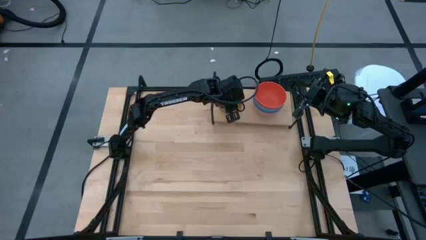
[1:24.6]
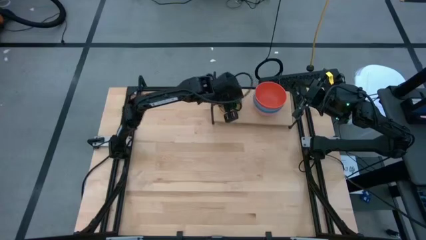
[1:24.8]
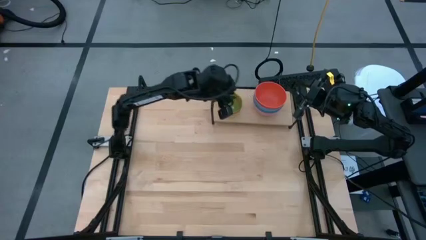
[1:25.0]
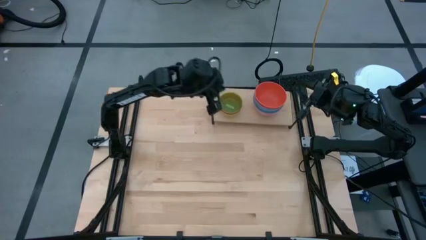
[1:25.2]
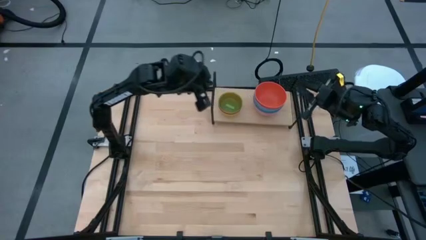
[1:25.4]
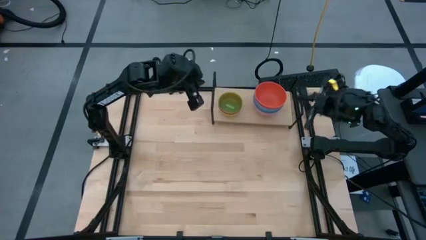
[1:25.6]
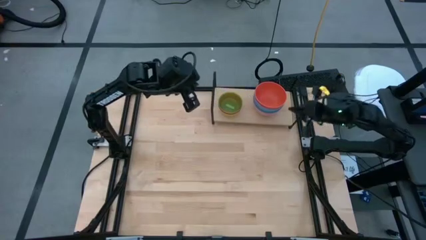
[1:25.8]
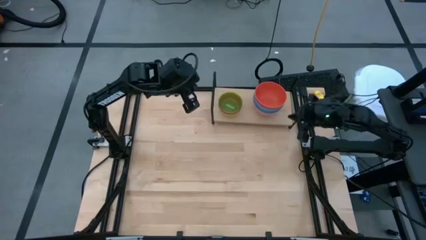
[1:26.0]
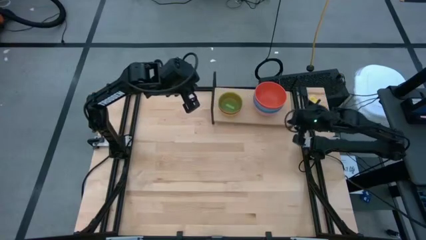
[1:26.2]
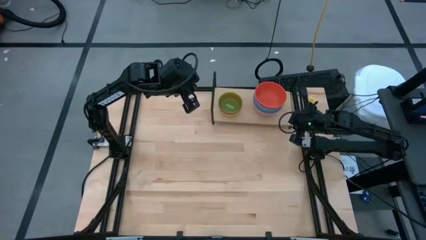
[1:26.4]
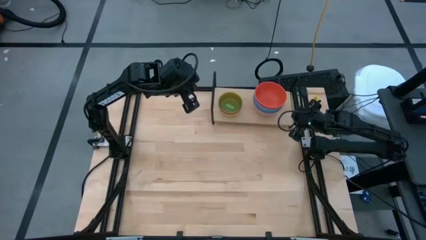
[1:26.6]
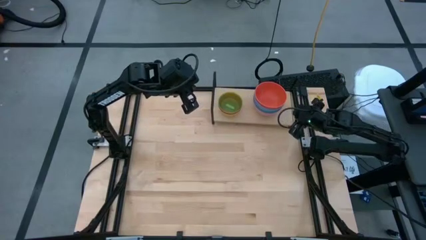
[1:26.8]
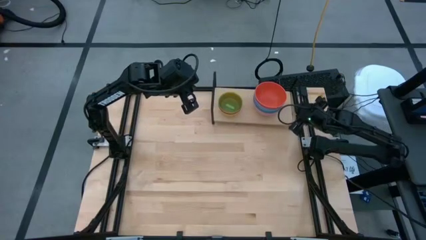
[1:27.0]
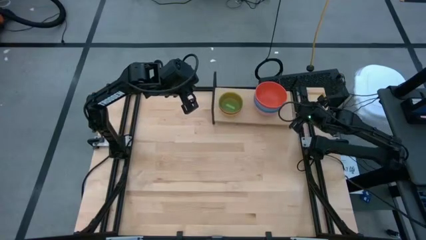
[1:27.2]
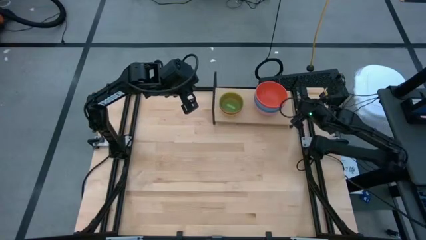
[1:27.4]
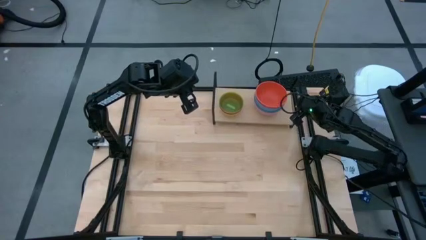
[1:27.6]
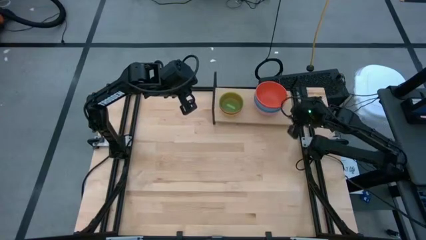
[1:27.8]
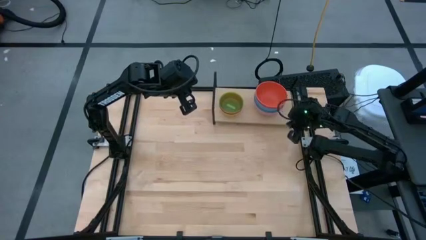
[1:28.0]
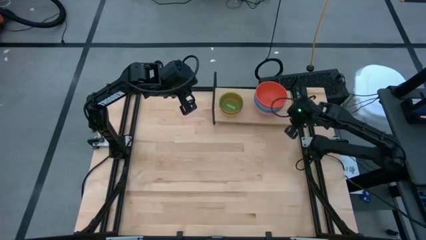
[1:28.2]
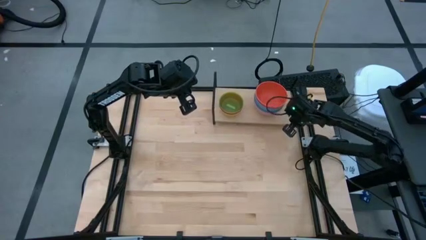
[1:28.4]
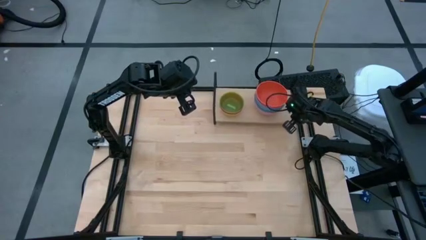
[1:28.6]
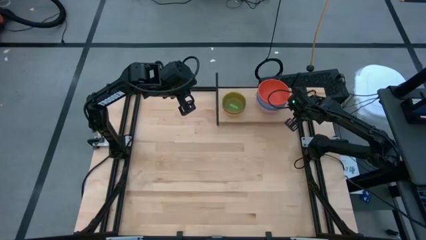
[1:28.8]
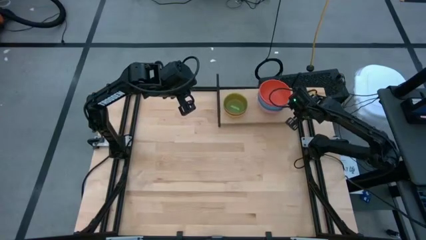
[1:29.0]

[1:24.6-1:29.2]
Task: Place and stack bowls onto a shelf
Adjust the shelf

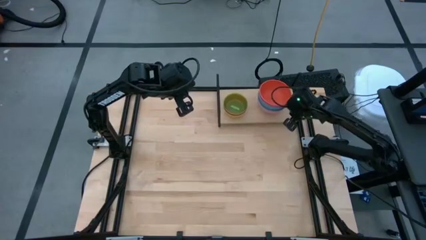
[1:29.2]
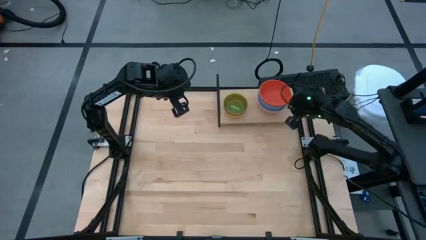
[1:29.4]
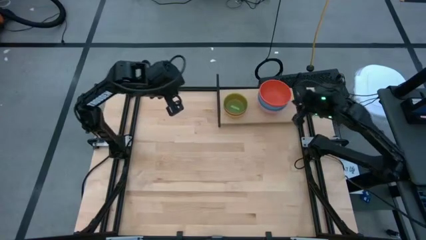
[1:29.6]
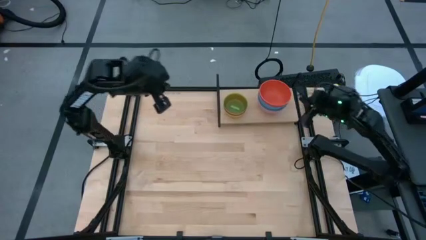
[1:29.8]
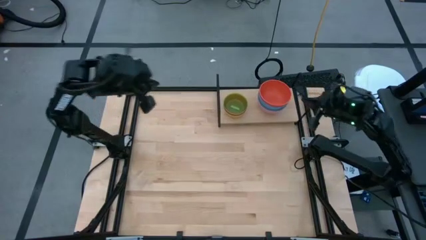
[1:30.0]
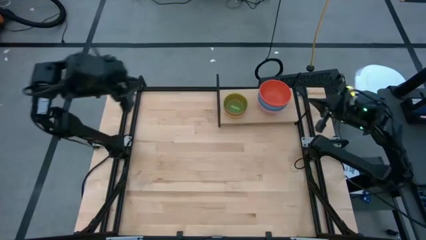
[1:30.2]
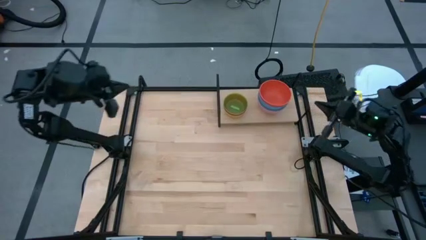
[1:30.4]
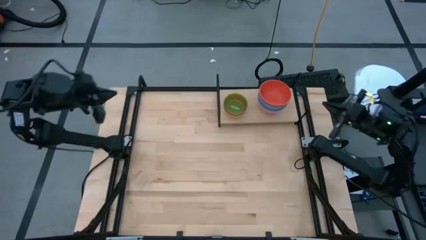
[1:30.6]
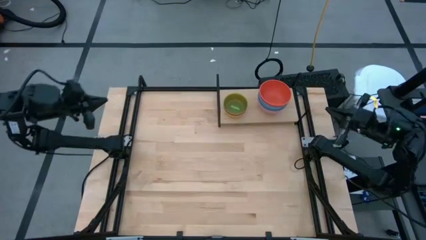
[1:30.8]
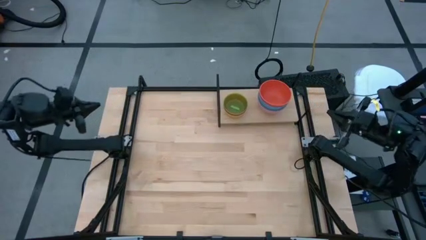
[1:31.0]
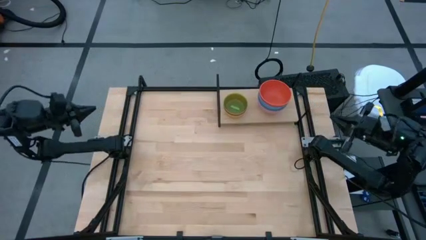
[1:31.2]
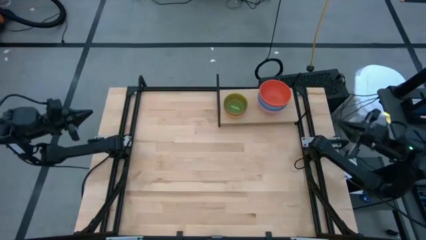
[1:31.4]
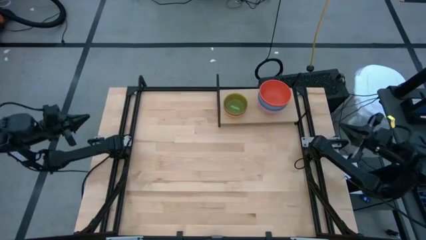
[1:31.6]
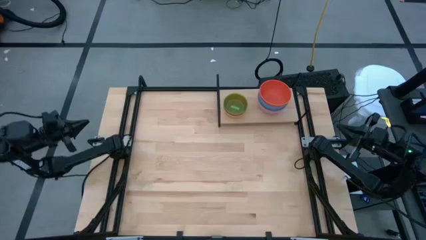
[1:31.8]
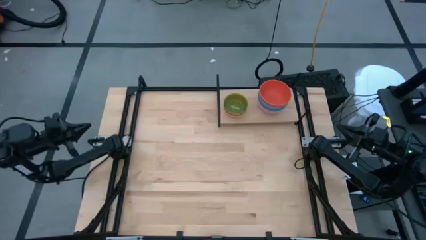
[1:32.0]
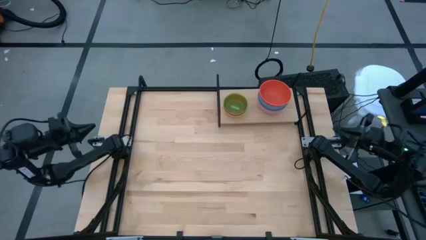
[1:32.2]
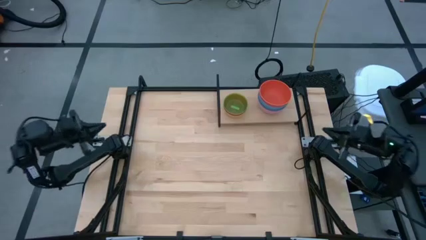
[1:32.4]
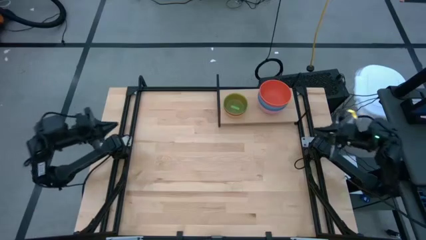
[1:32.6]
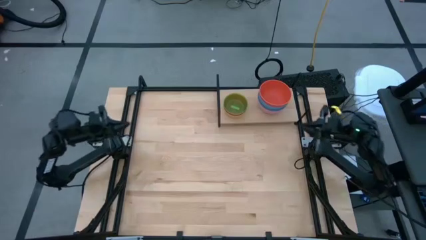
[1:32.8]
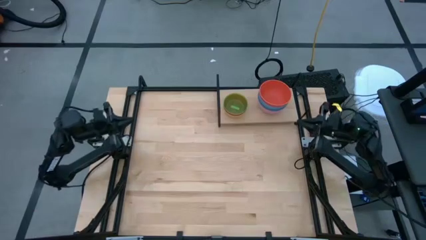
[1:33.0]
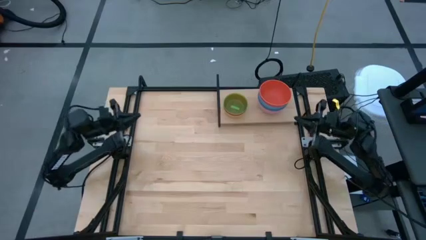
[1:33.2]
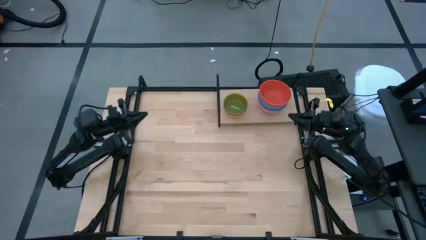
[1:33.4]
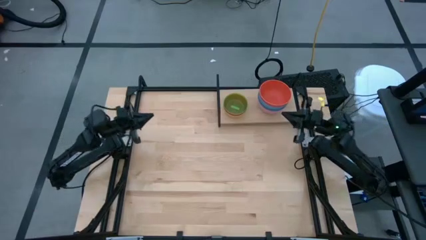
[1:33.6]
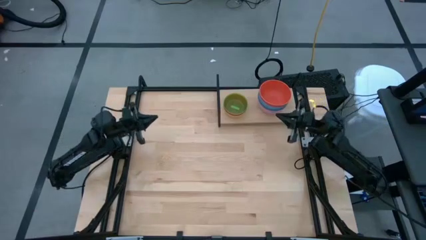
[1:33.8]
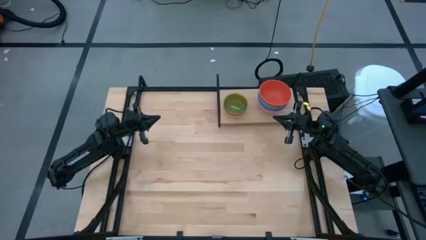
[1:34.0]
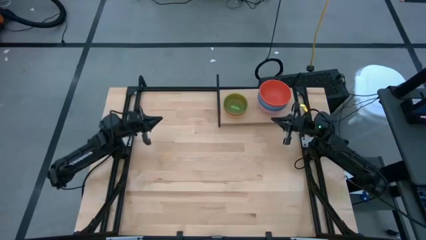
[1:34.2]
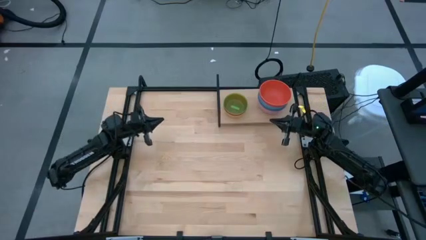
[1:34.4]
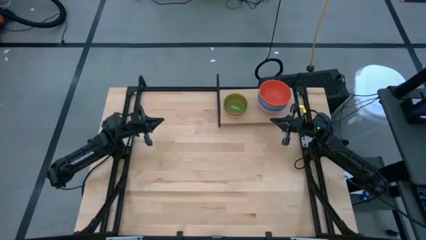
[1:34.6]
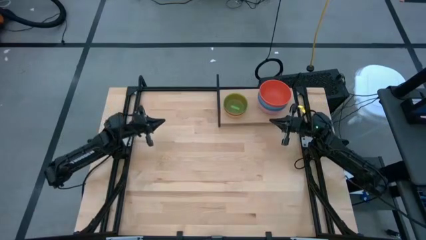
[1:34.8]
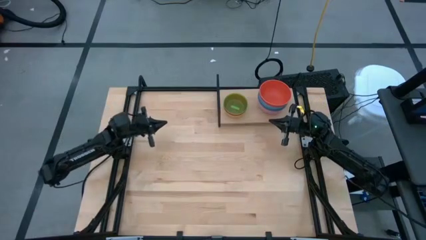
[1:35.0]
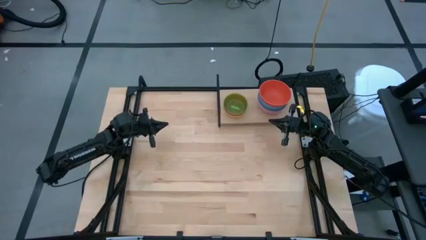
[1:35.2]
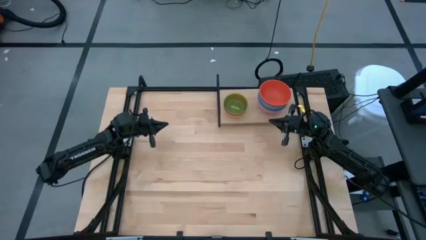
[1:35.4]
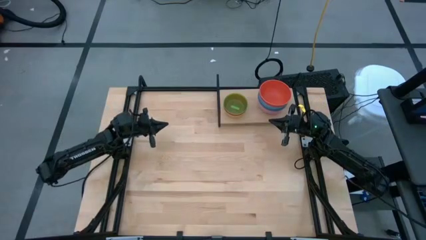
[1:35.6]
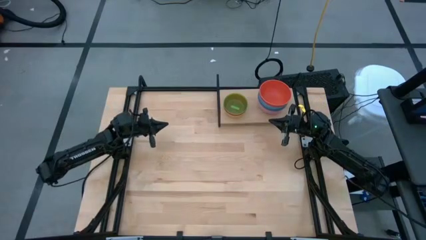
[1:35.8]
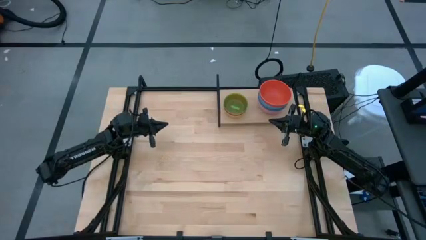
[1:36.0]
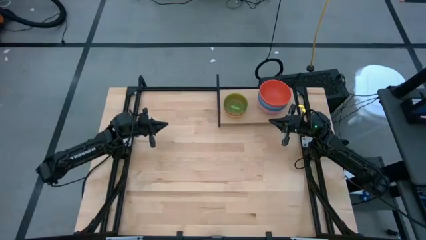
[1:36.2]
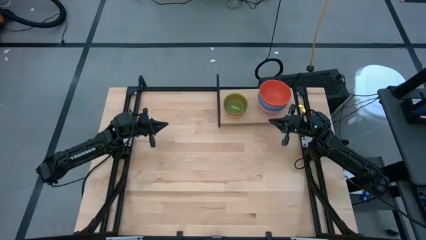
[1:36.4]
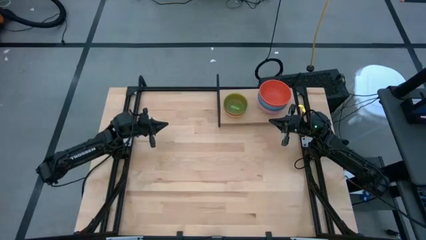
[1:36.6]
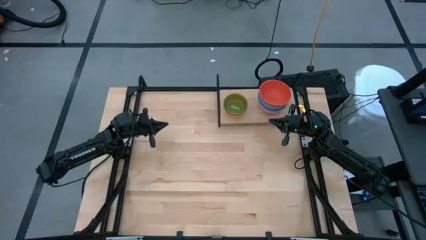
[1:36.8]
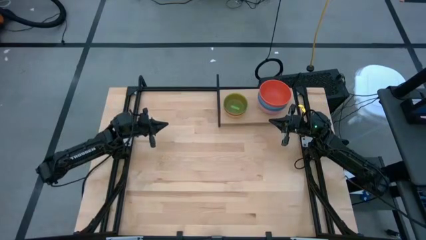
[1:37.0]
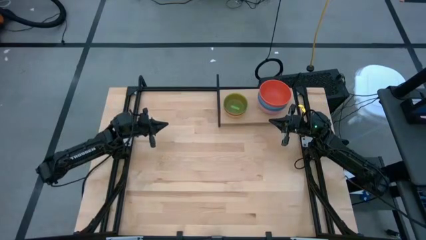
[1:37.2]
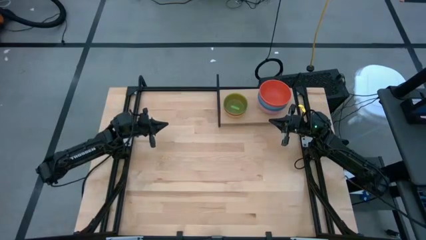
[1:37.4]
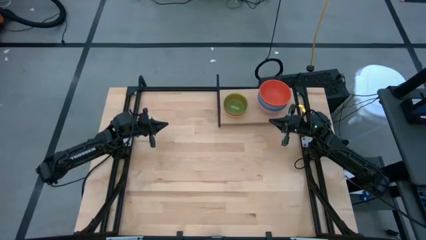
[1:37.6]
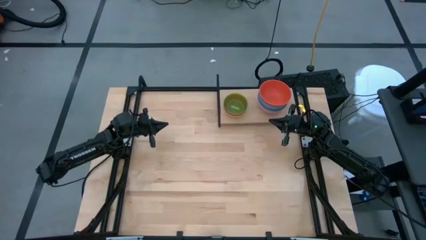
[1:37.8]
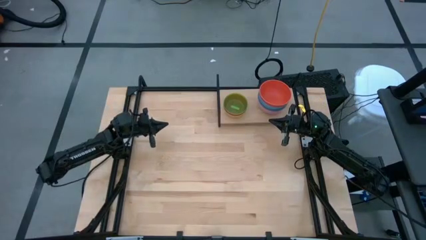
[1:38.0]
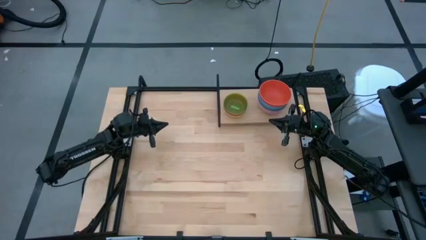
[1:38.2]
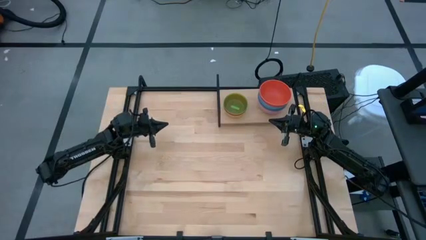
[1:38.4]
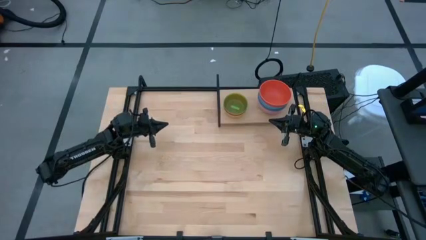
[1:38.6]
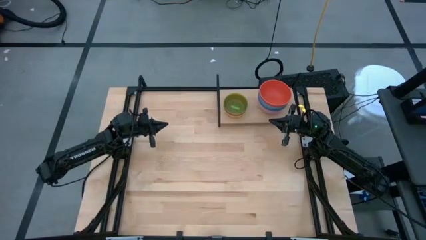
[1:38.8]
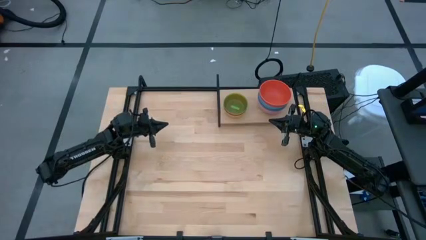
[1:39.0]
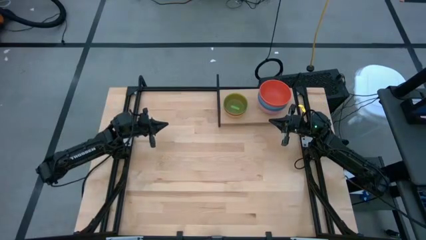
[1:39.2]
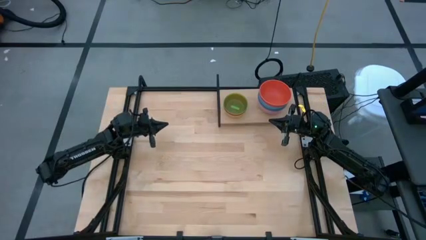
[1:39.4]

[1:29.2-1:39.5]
Return to Home Position
